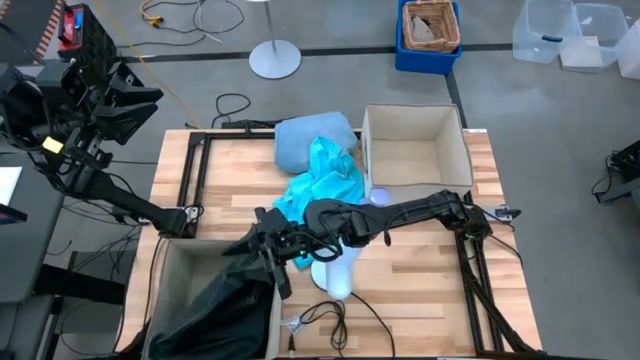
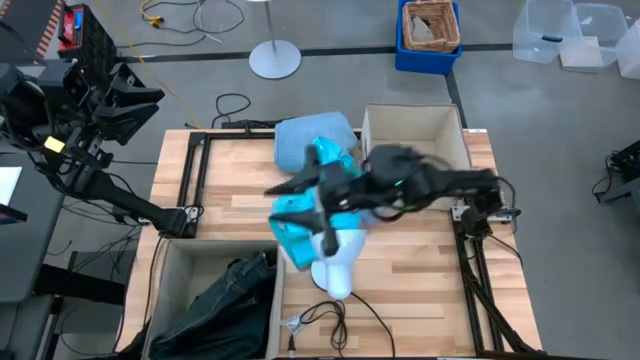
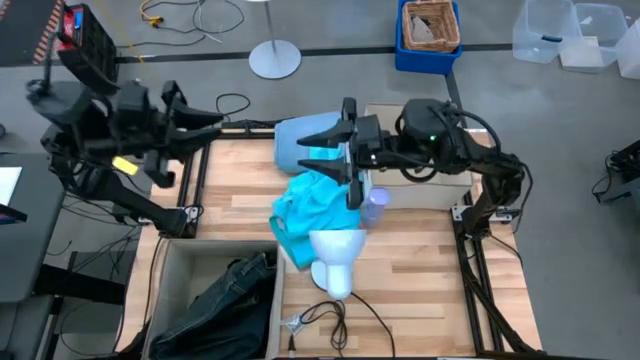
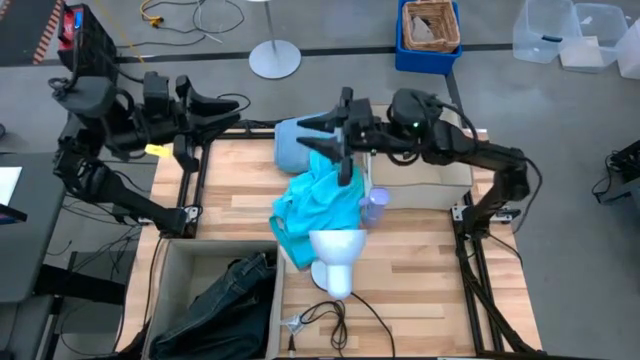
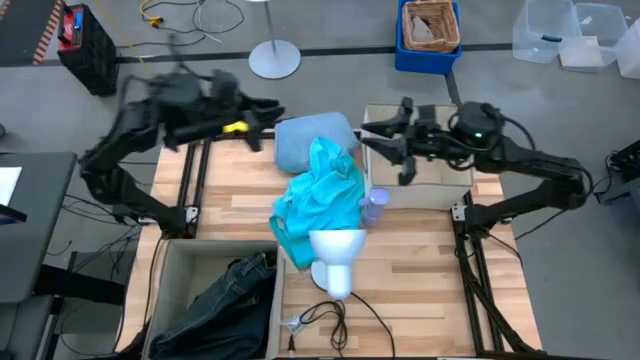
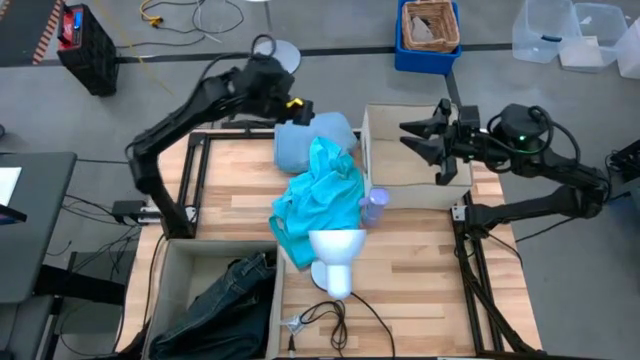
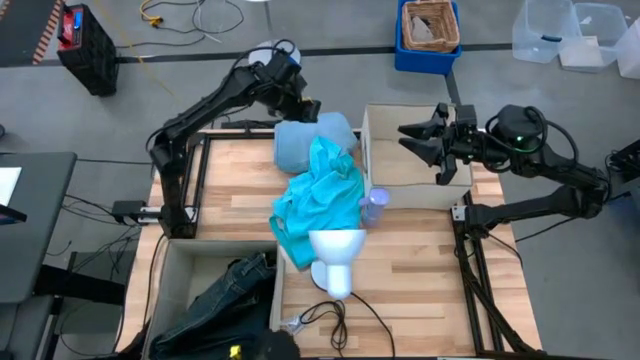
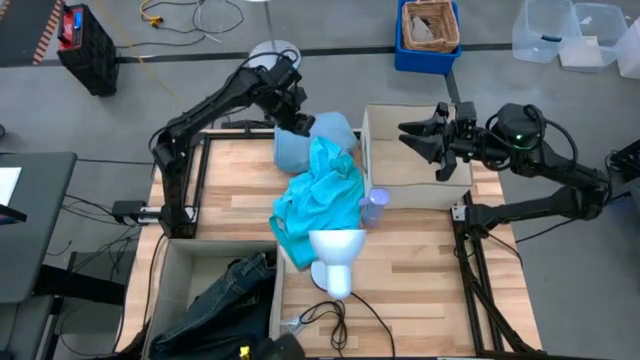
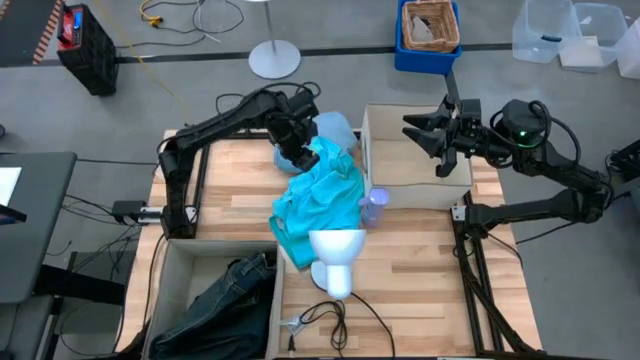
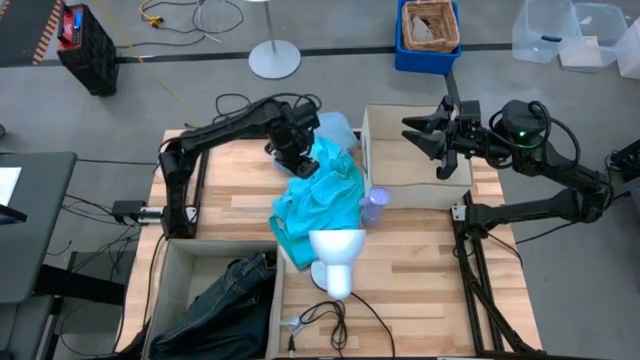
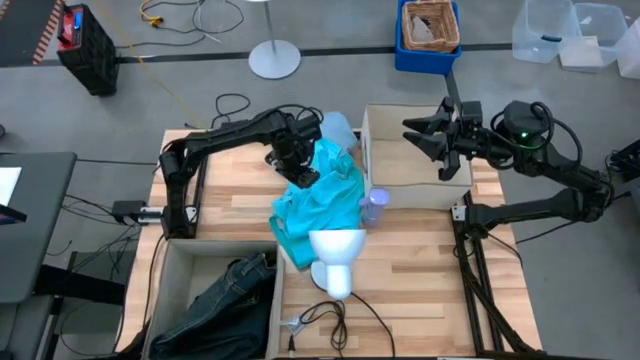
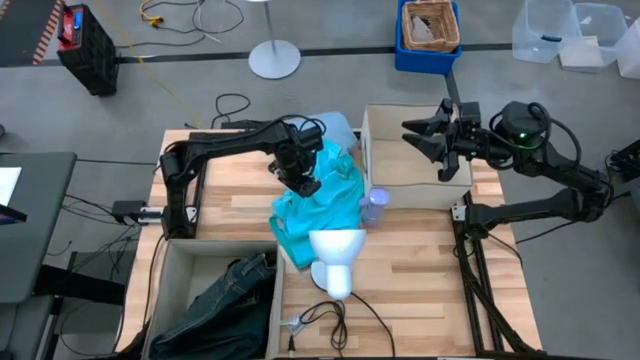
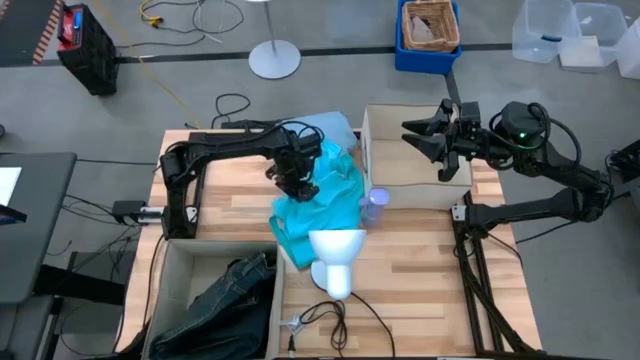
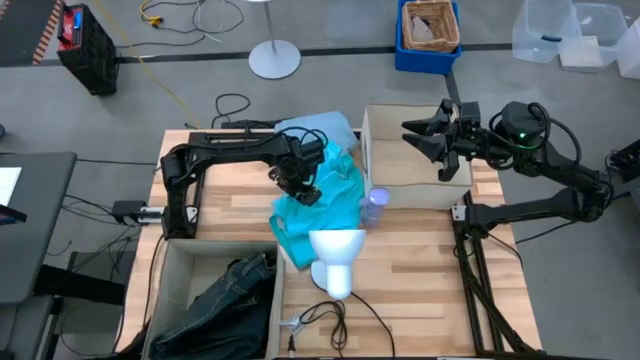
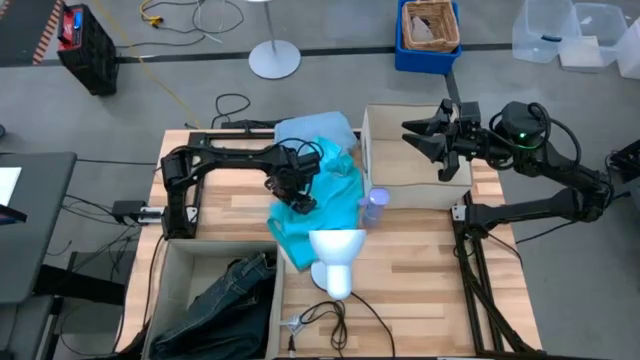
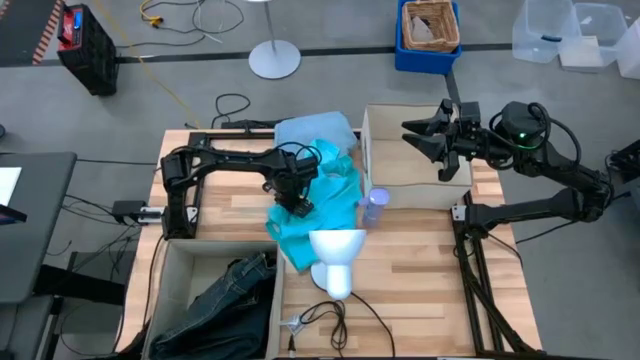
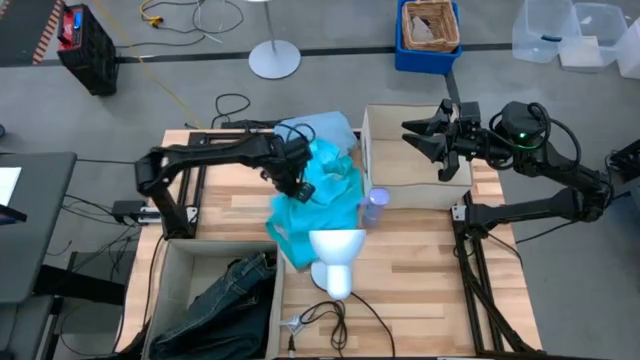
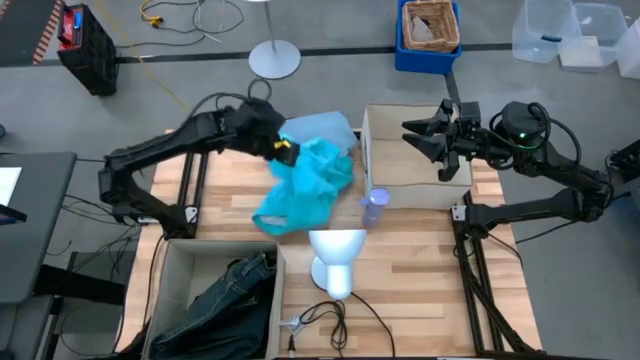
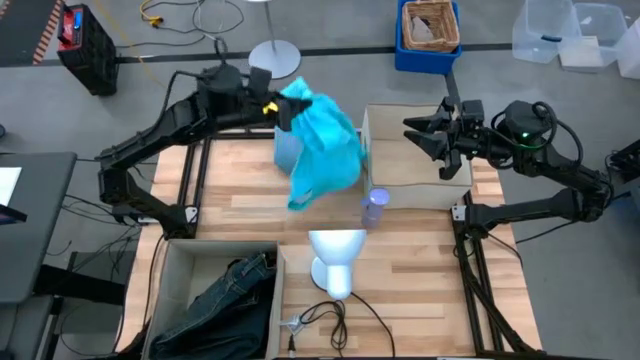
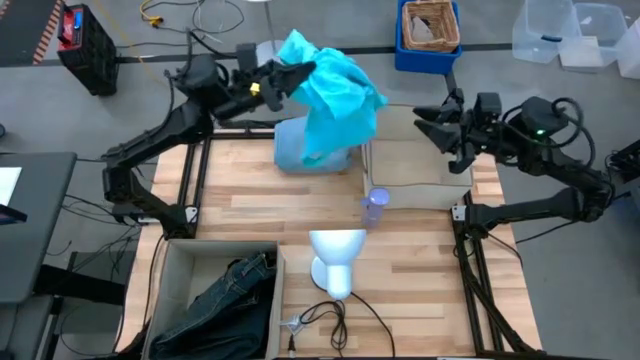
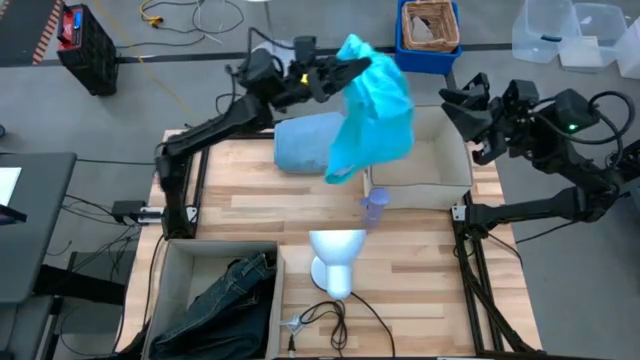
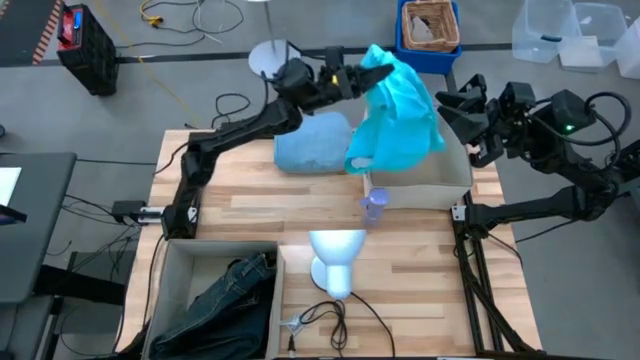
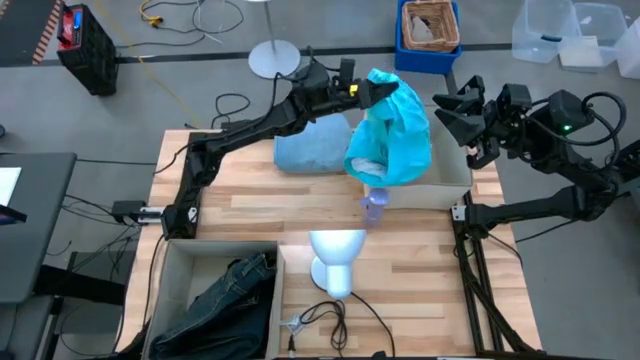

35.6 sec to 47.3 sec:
Task: Sort clothes
Put the light blue shorts into the top laundry organizer

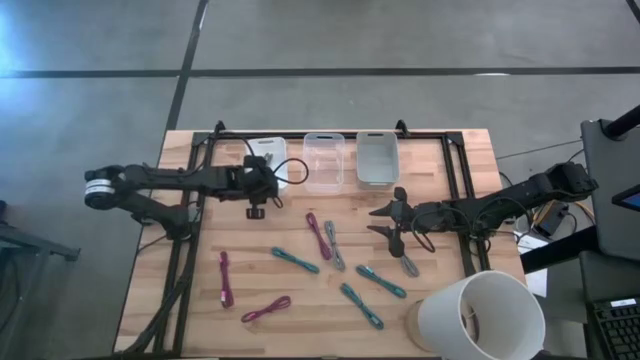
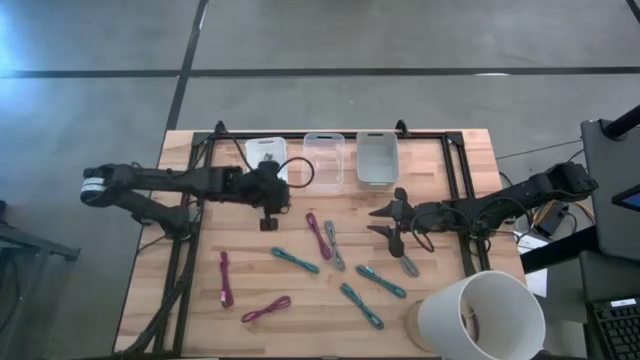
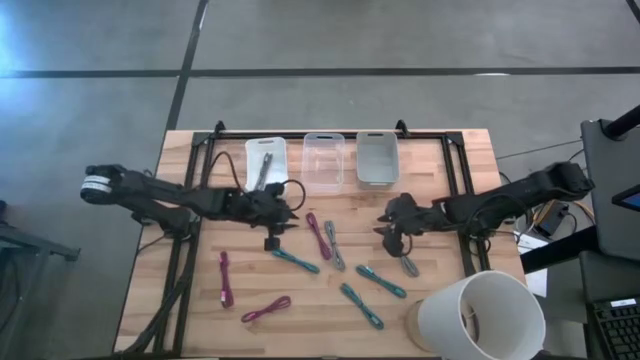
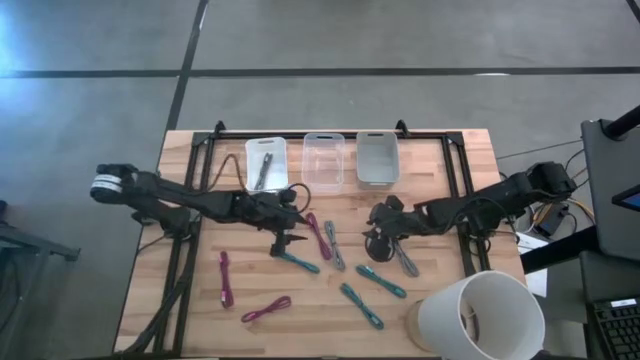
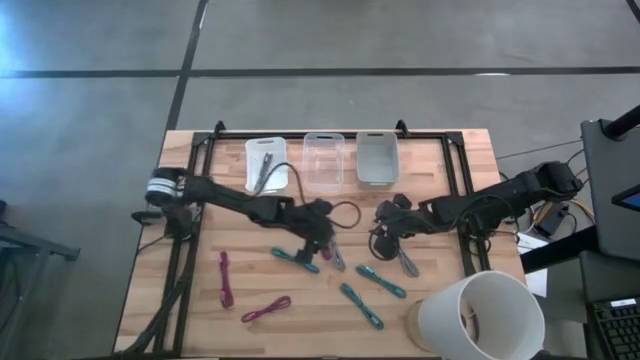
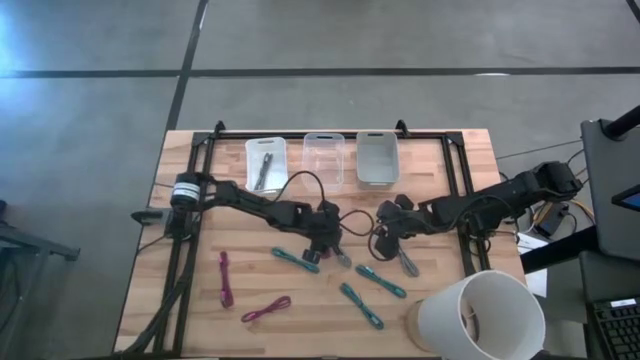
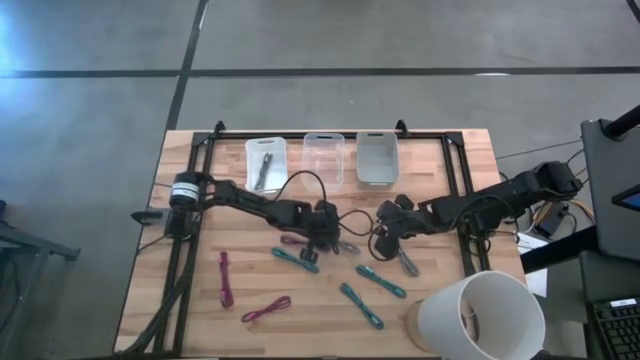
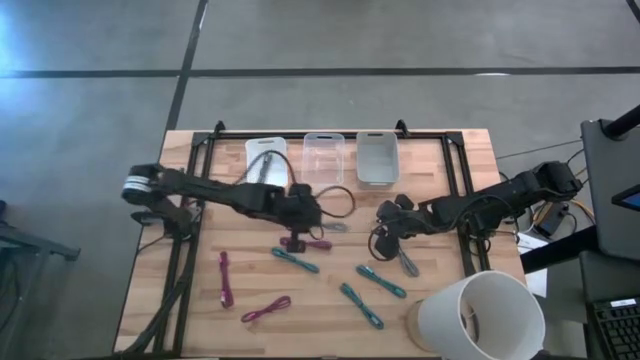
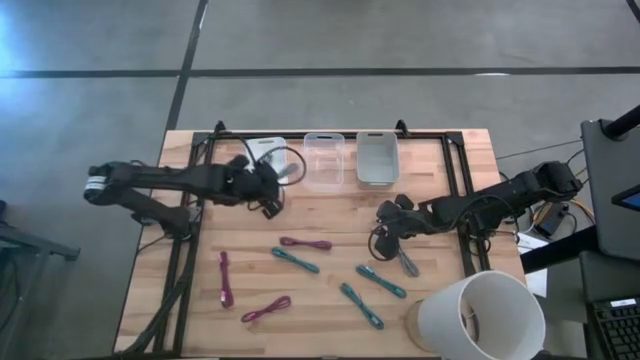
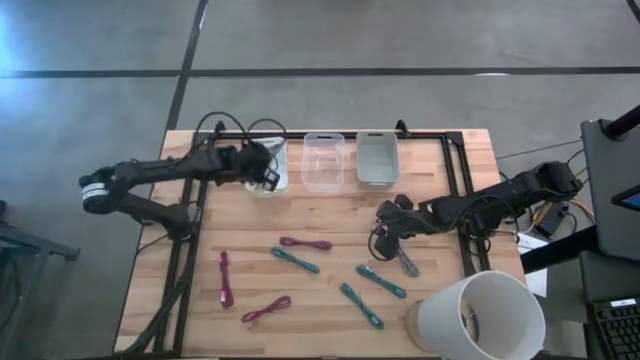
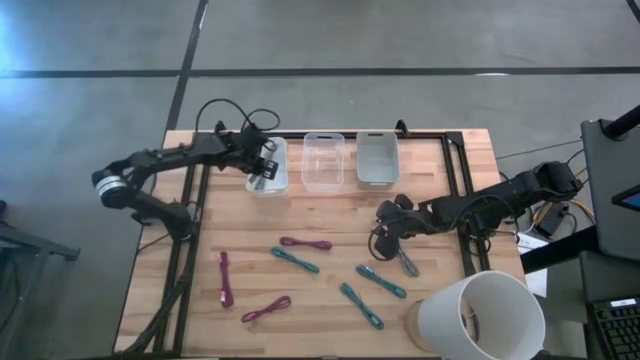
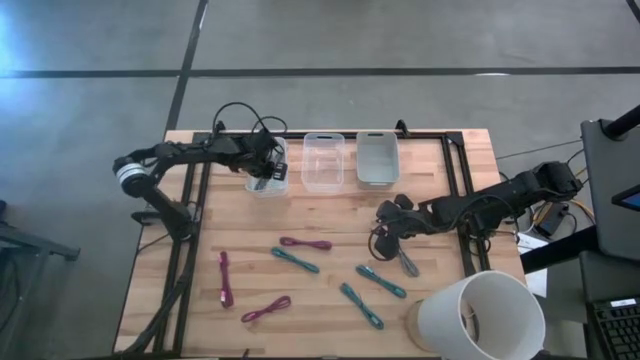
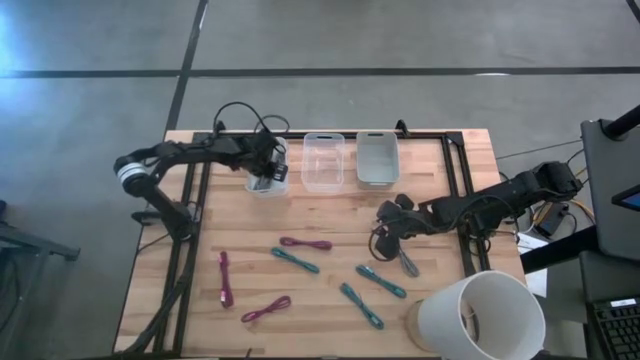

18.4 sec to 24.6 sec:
Task: Pick & Place USB Port
Put the left gray charger cable into the white bin

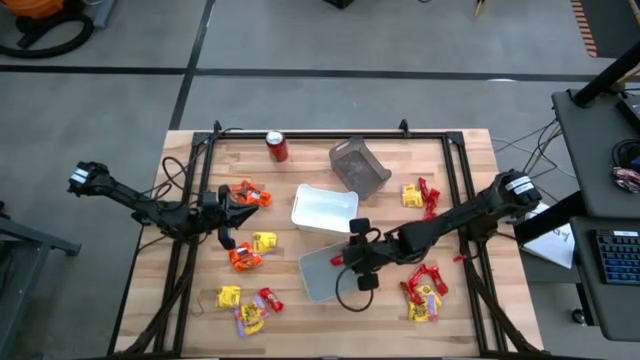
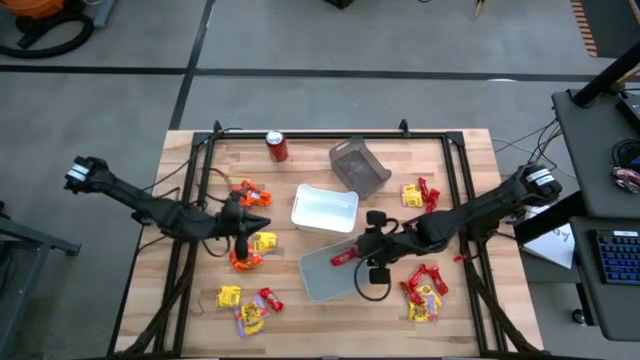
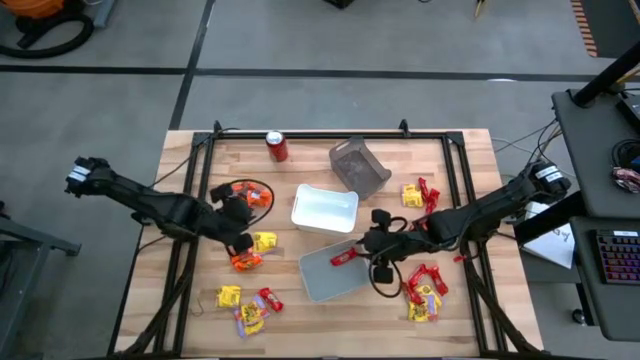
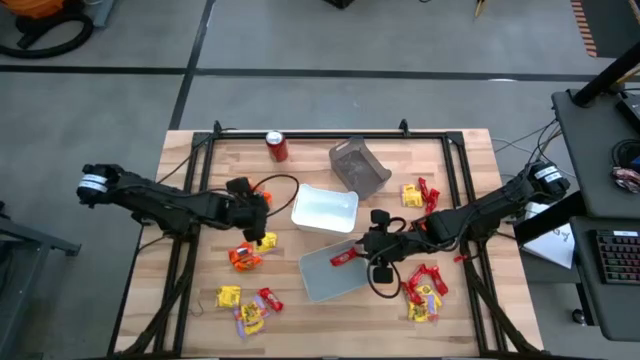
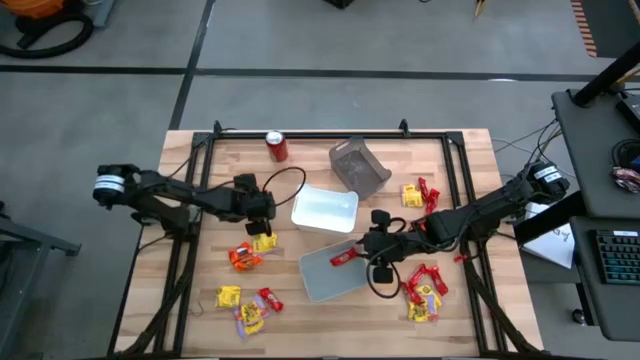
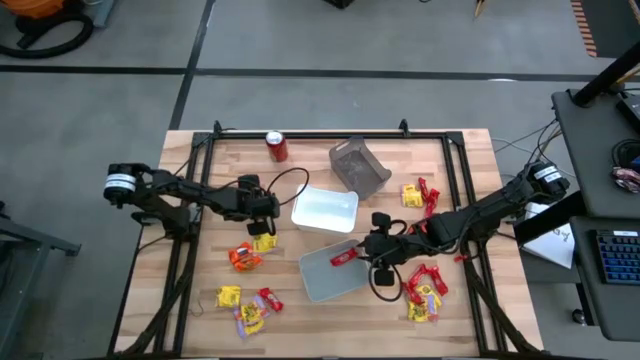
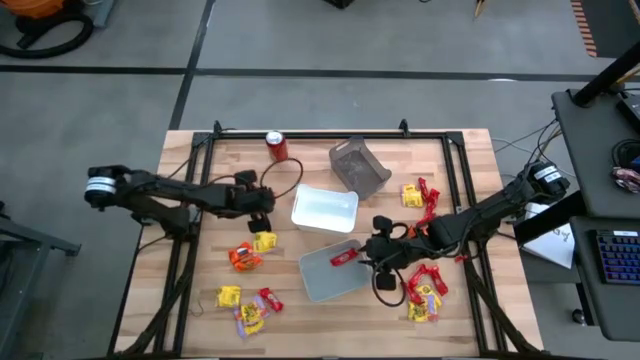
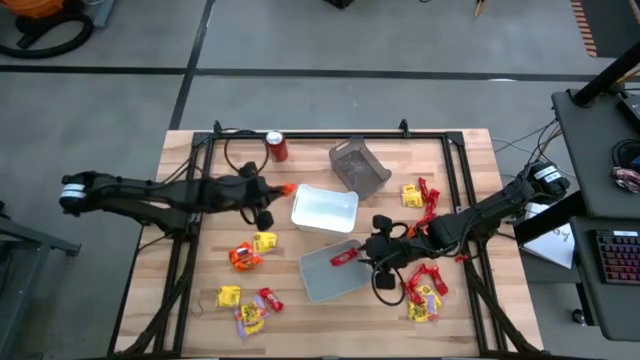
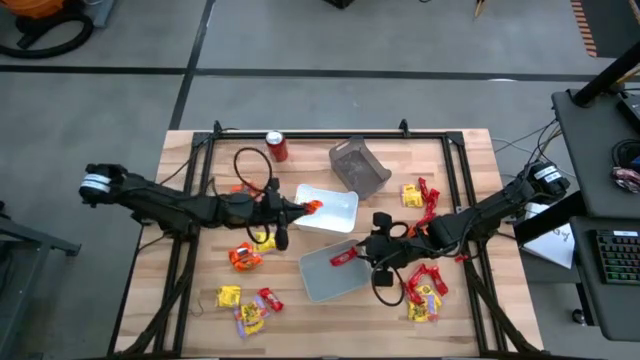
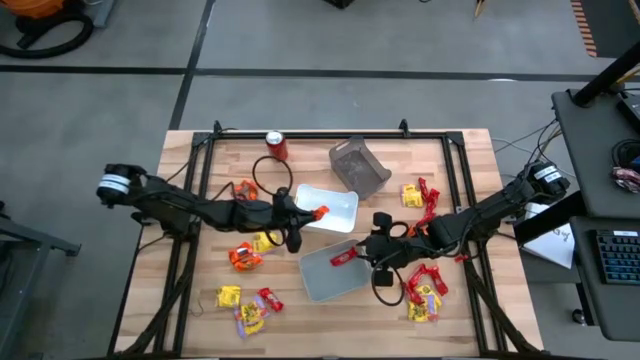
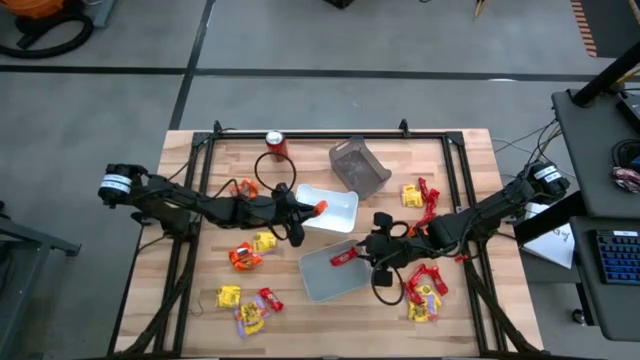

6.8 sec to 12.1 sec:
Task: Sort candy
Put the orange chocolate pack into the white bin
